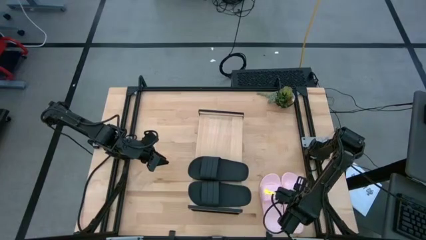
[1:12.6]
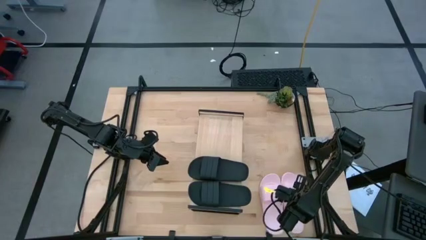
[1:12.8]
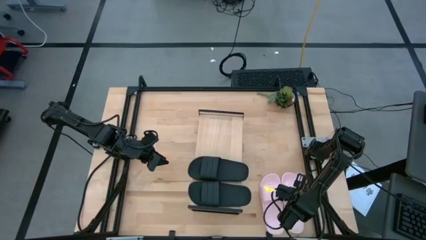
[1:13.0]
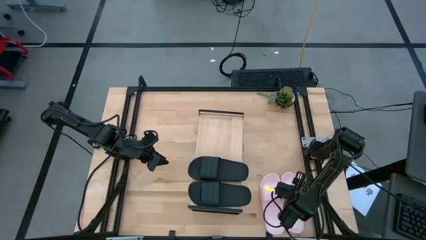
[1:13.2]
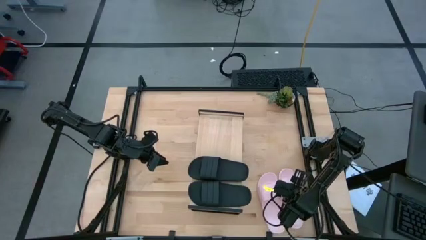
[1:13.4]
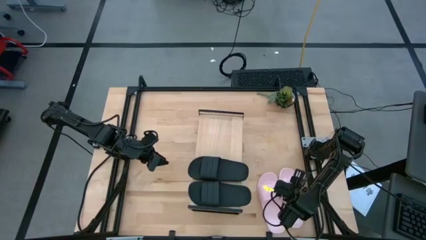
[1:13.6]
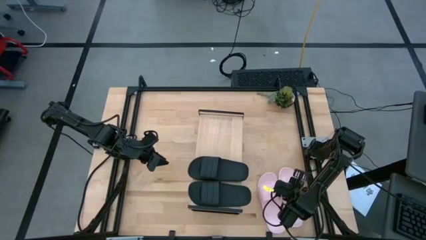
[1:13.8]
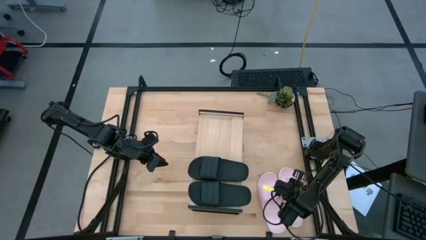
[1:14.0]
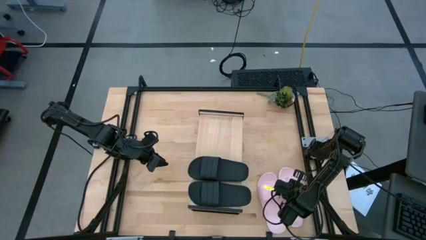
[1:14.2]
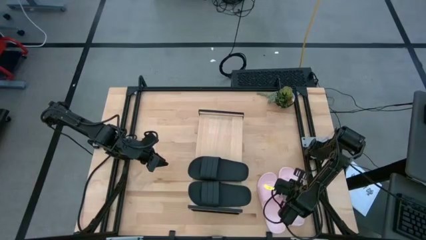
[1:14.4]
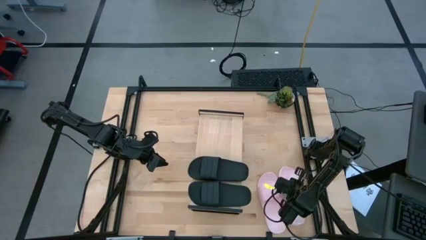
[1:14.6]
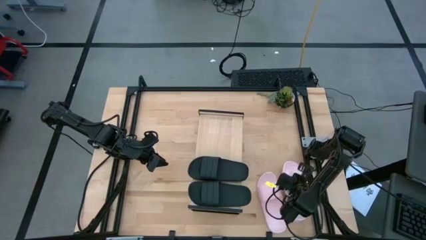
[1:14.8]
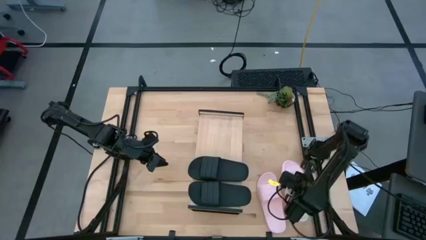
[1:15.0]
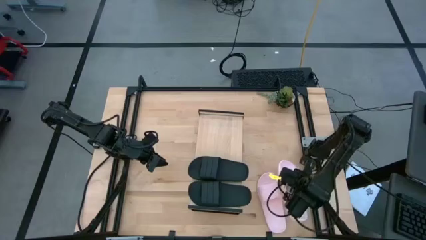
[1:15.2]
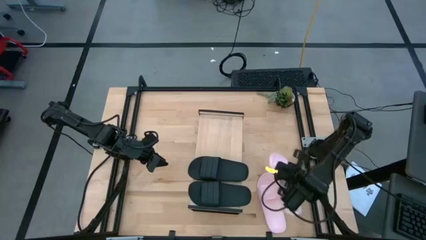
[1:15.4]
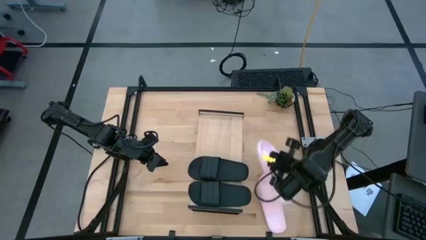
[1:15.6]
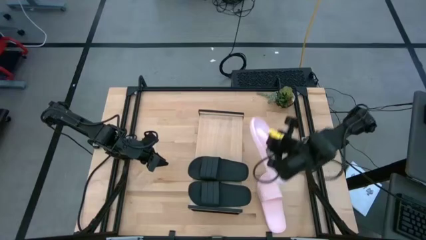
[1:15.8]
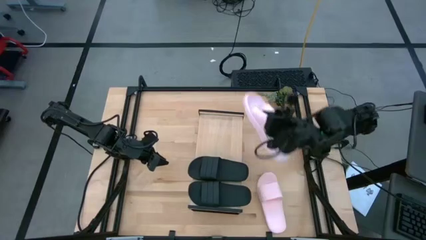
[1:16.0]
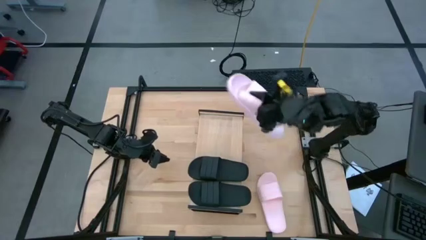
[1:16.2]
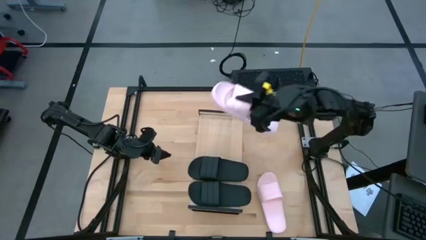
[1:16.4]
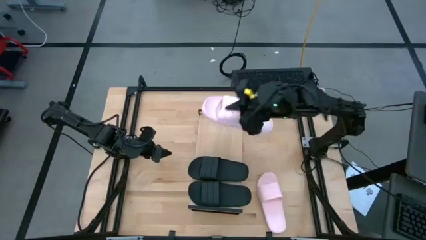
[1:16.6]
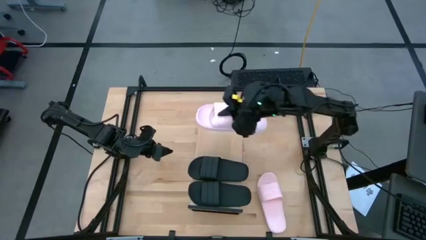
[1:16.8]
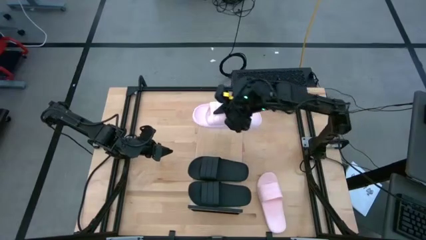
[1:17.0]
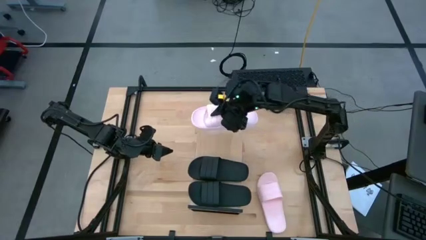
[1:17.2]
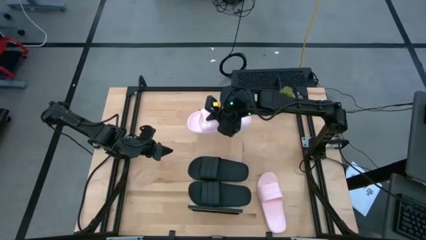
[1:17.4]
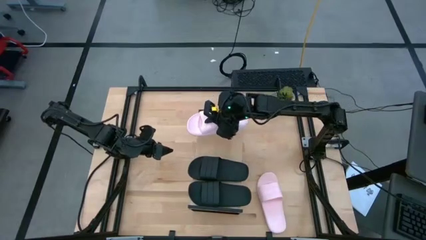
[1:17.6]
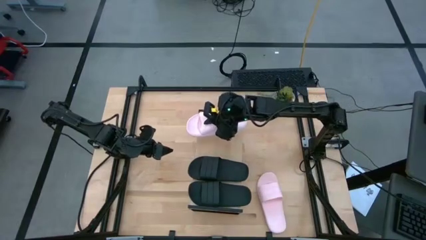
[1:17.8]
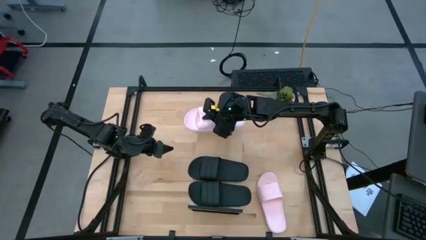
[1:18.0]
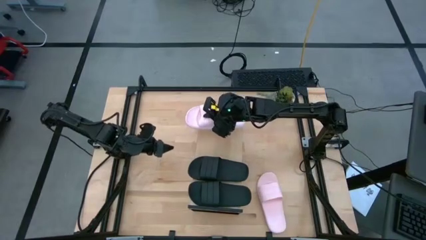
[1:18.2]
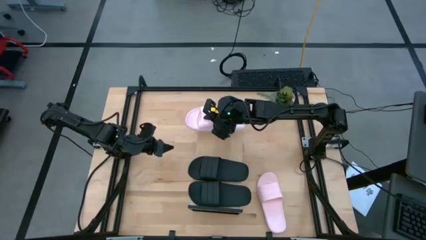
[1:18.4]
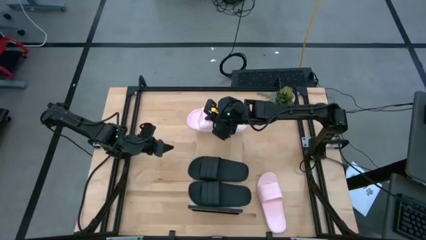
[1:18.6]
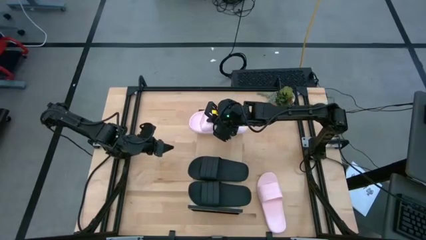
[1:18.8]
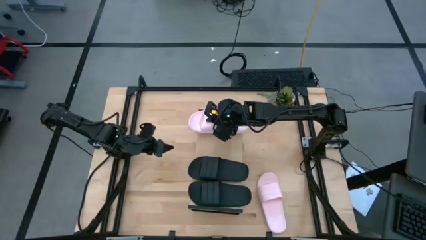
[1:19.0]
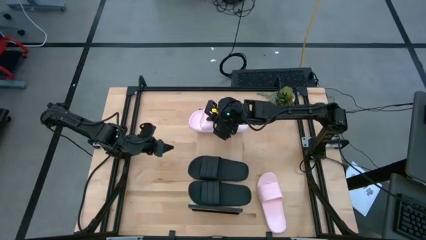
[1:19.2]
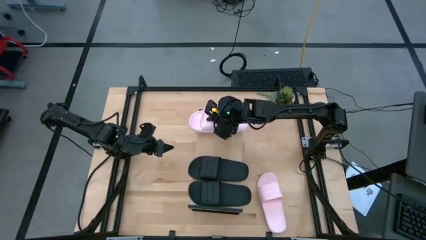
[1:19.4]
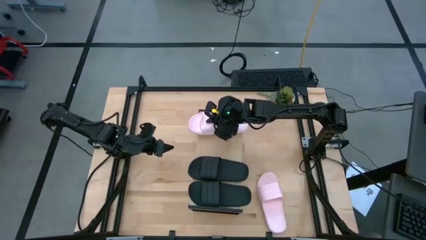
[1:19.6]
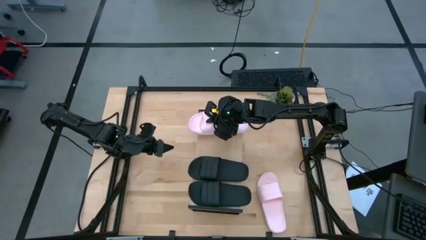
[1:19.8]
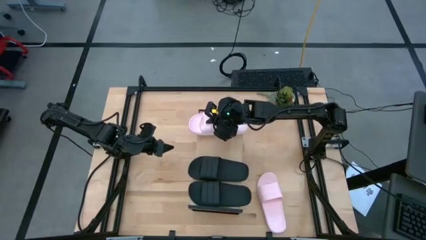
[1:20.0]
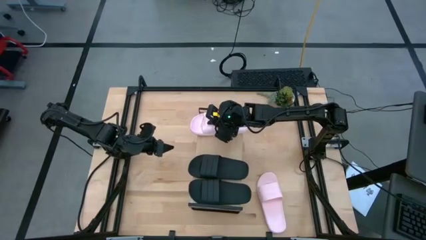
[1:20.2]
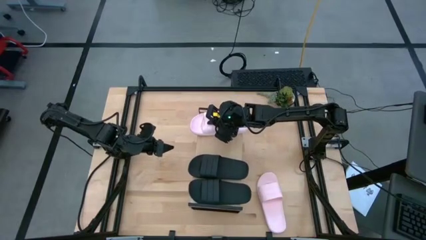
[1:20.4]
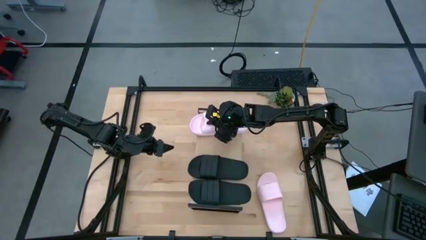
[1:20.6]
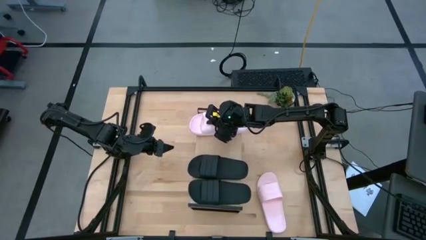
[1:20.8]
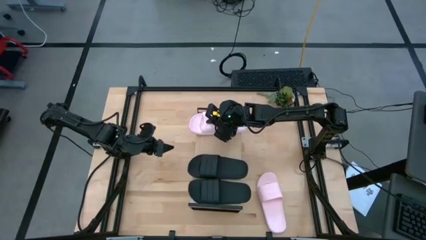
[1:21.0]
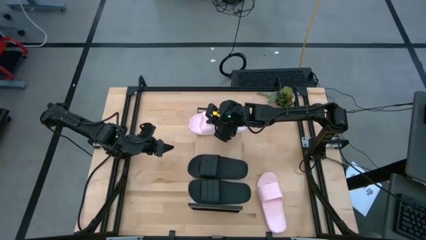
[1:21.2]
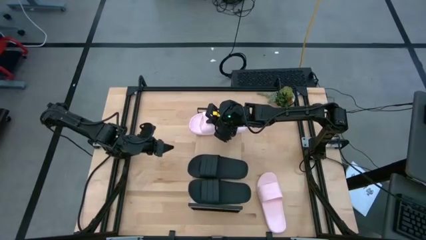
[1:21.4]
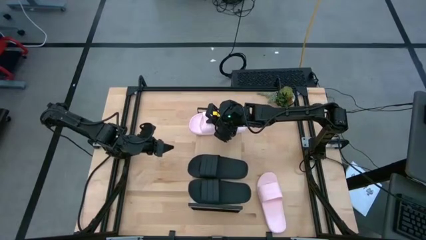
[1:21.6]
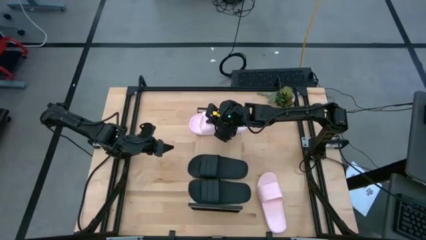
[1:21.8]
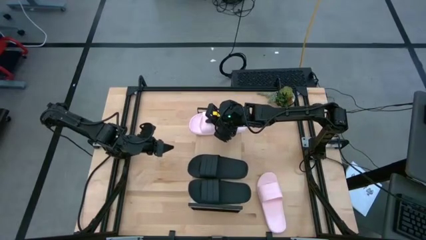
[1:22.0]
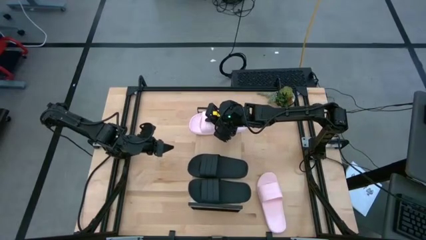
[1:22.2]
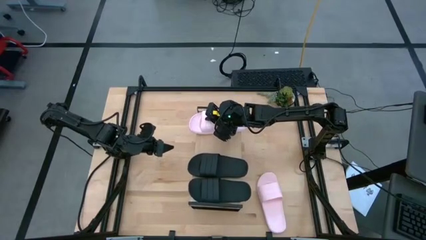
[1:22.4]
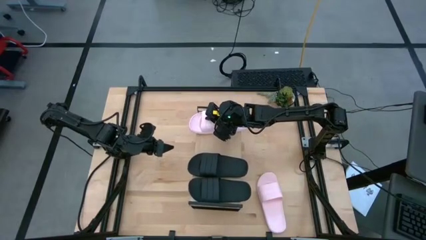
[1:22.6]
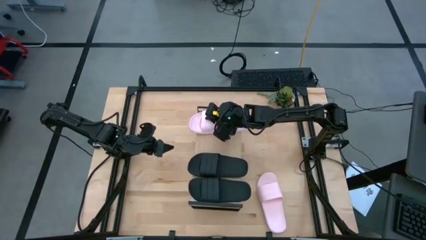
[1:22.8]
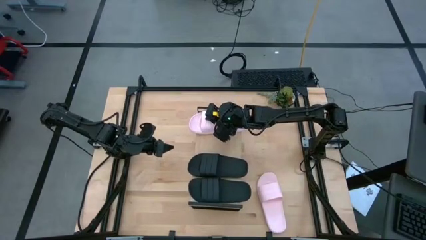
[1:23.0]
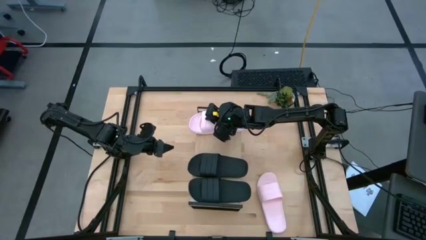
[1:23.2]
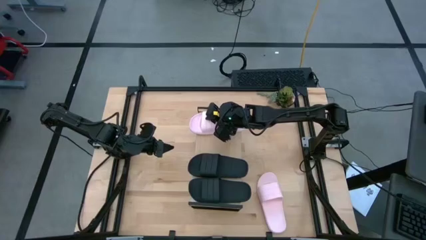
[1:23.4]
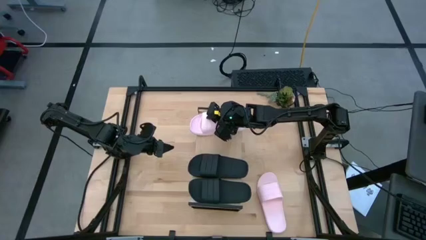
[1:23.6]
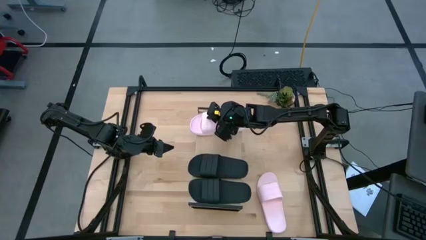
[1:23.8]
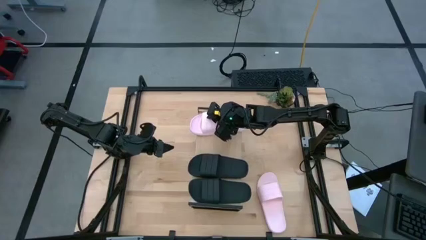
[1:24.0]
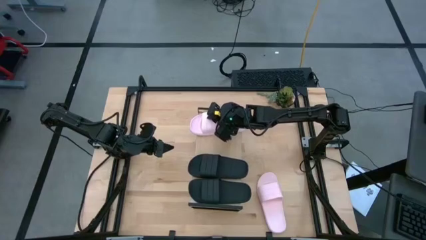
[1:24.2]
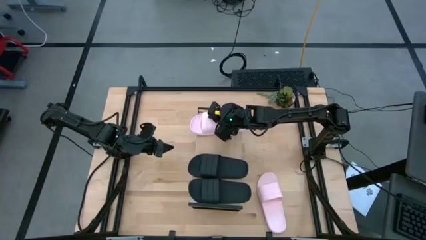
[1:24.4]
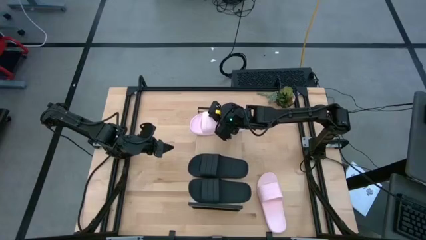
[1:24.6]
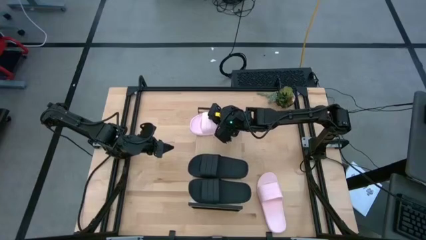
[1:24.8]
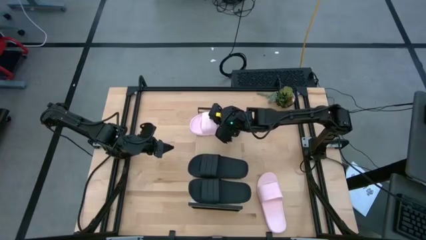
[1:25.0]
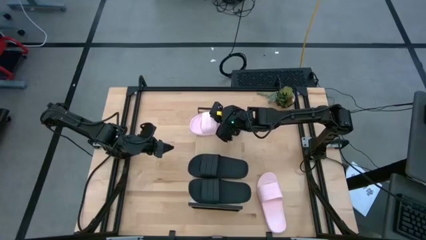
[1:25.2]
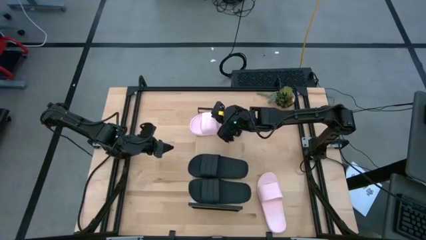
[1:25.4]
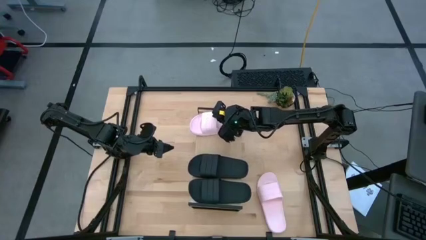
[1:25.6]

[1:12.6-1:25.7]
Task: Pick and place slides into the shelf
Put the right pink slipper on the shelf

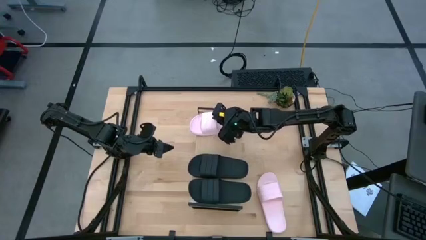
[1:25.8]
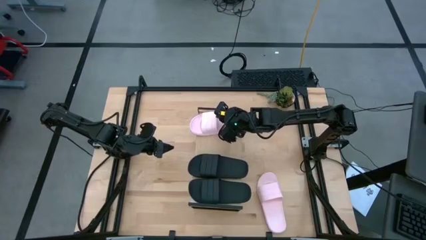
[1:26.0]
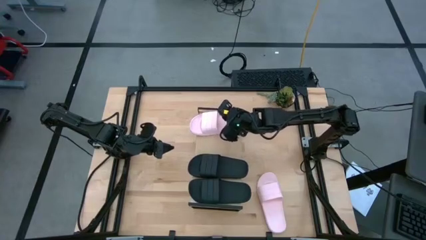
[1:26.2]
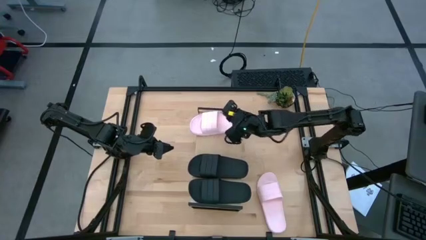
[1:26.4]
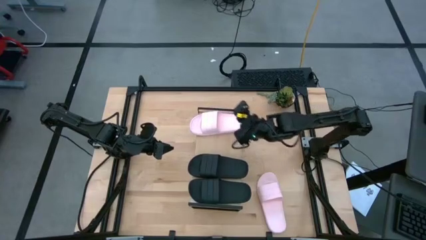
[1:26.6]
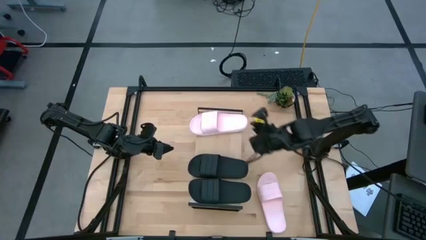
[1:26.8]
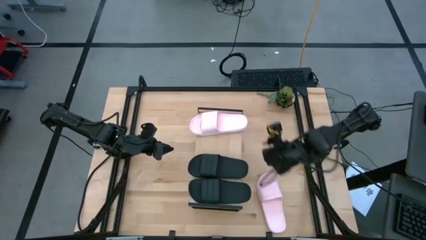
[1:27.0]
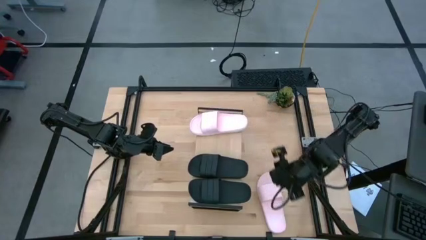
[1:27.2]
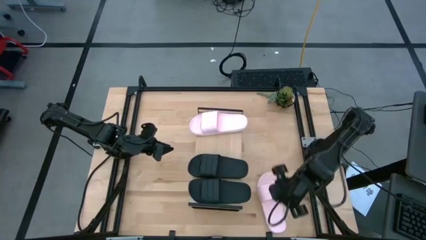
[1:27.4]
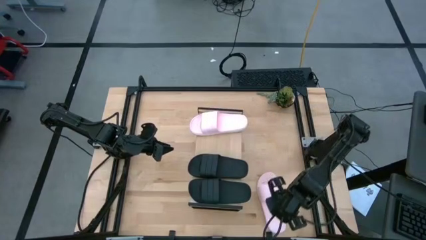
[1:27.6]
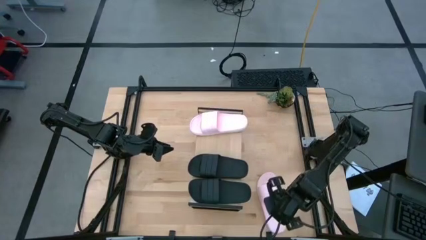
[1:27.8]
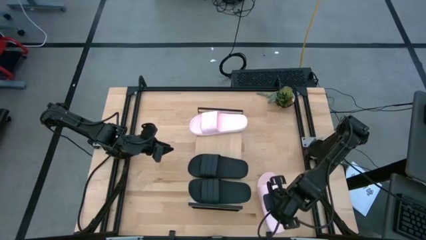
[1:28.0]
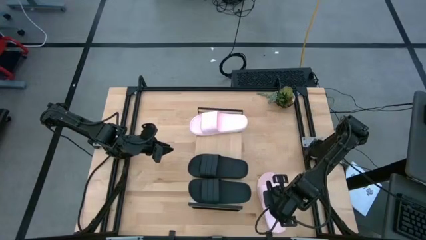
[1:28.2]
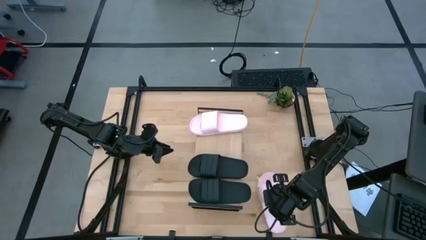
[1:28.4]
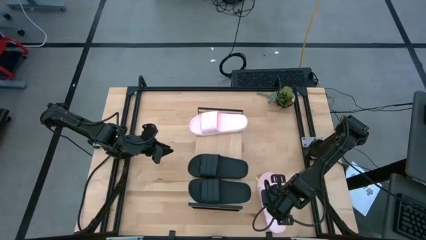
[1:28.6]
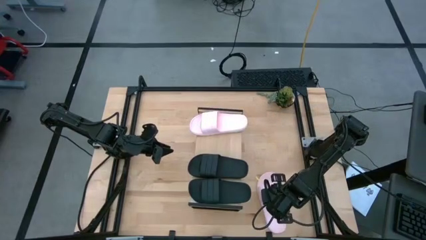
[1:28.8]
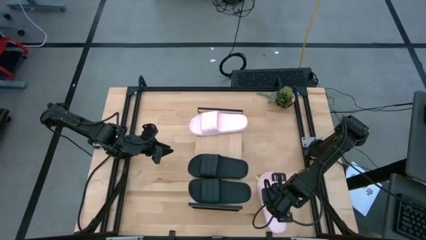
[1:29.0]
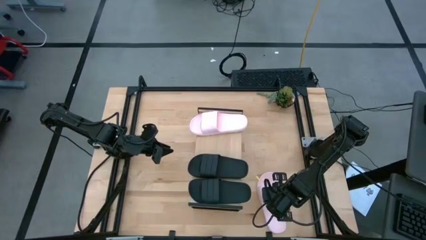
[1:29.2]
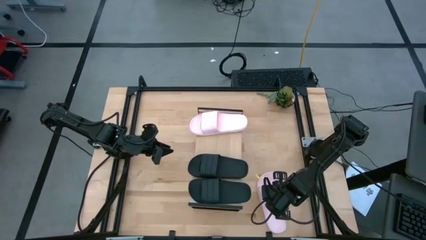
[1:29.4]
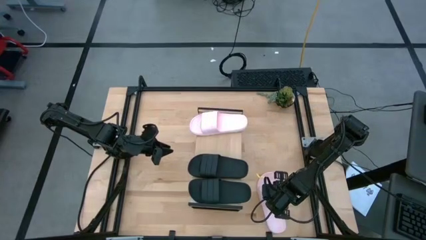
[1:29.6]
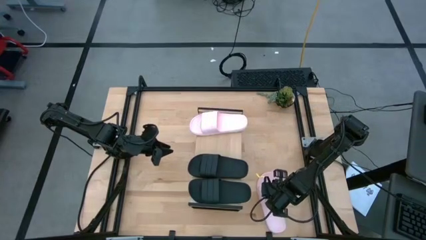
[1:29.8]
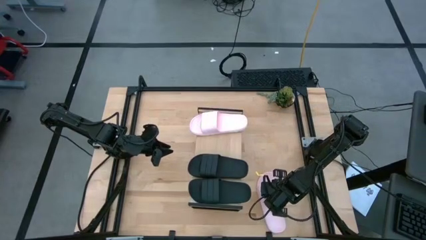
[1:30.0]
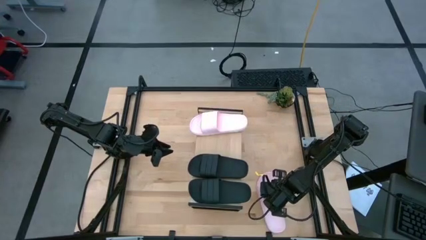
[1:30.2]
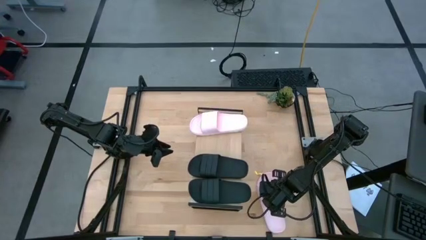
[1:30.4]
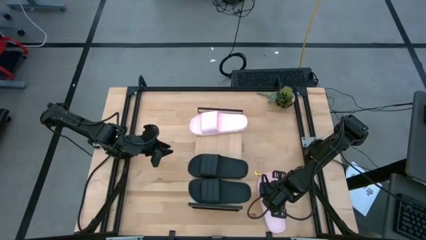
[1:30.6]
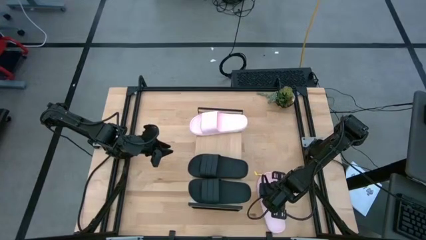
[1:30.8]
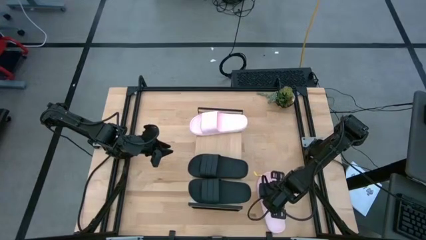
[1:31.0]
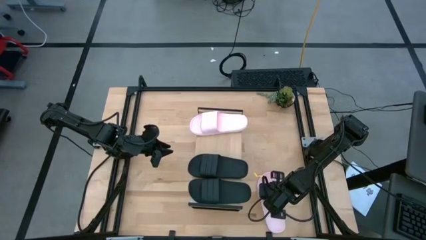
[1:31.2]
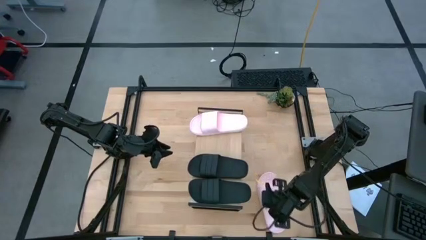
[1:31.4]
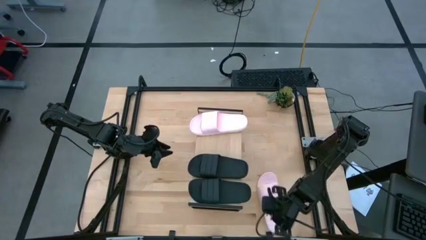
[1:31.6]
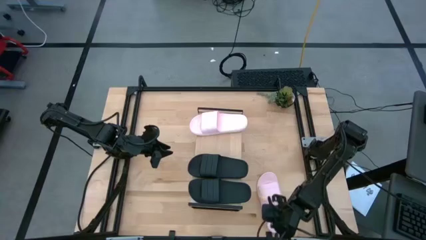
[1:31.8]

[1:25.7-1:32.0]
Put the pink slipper on the shelf
